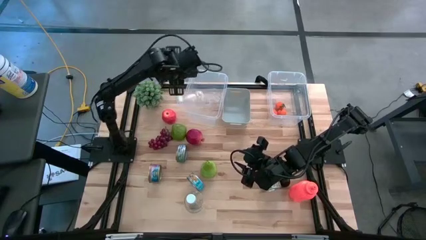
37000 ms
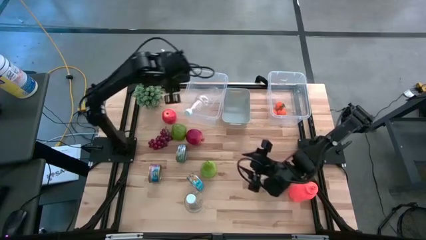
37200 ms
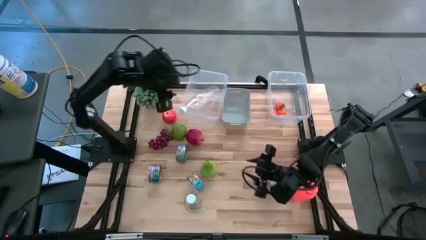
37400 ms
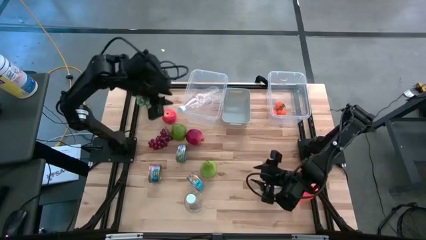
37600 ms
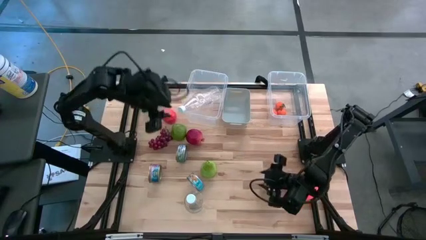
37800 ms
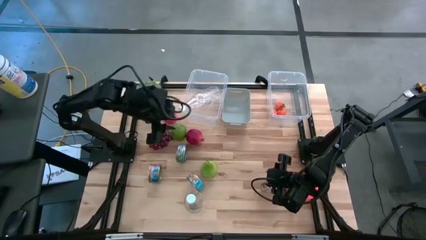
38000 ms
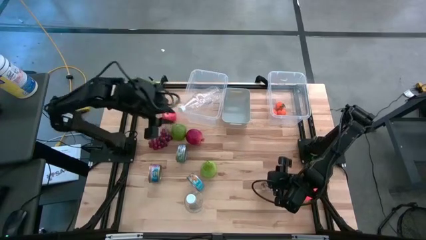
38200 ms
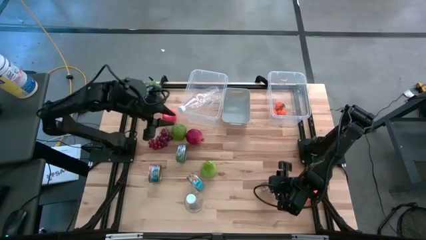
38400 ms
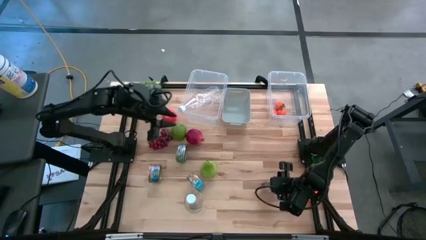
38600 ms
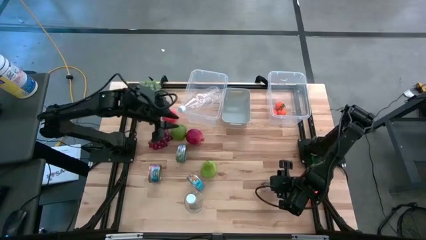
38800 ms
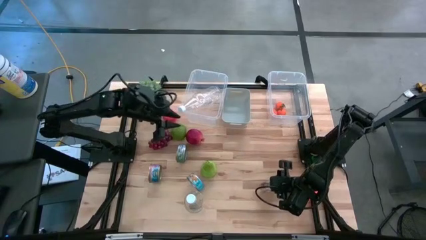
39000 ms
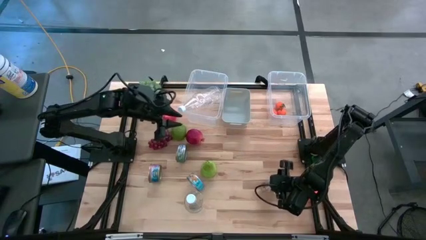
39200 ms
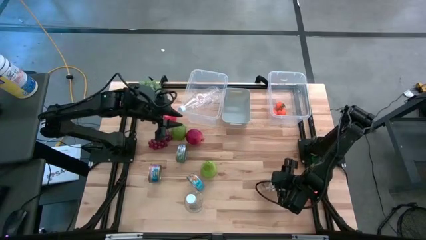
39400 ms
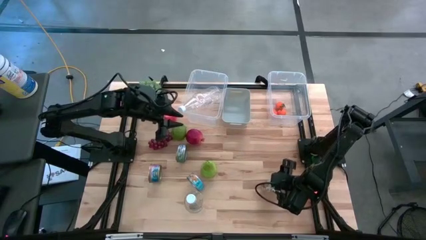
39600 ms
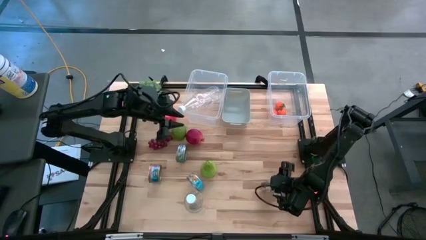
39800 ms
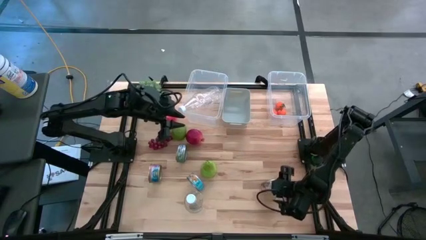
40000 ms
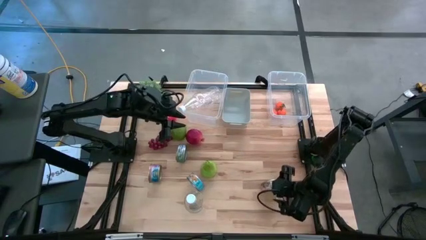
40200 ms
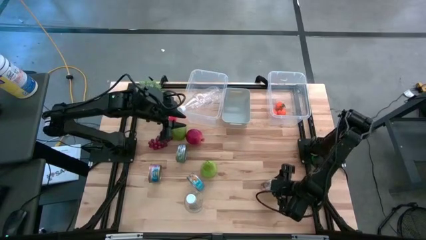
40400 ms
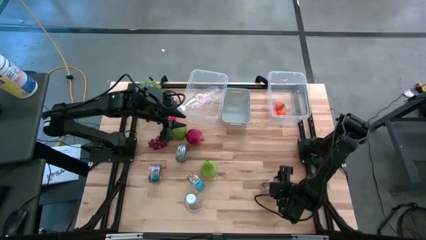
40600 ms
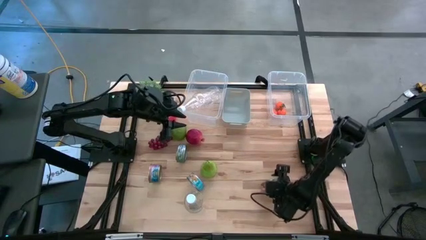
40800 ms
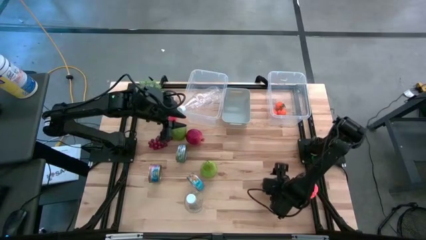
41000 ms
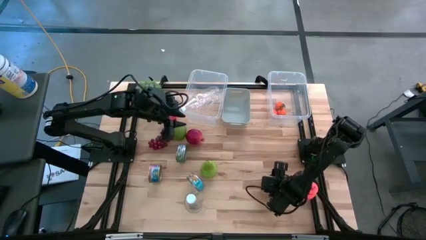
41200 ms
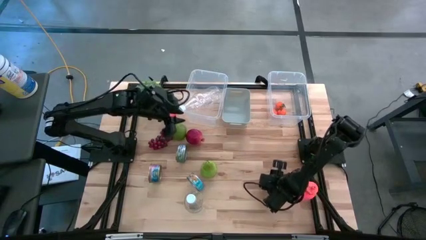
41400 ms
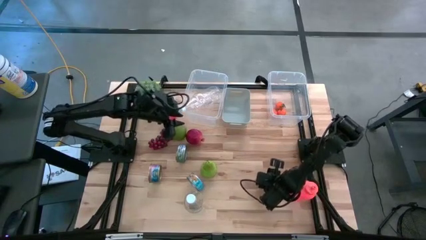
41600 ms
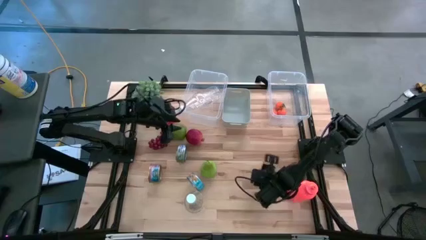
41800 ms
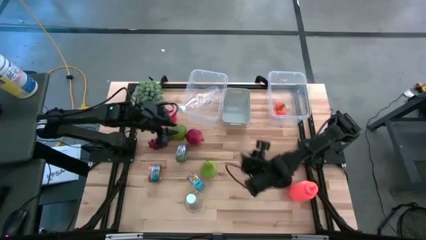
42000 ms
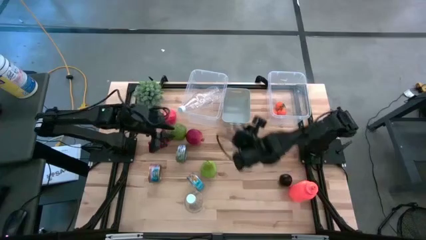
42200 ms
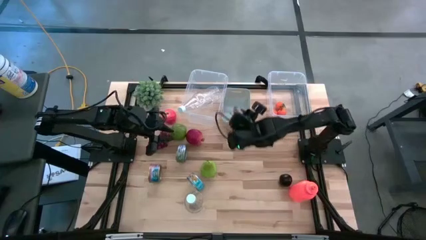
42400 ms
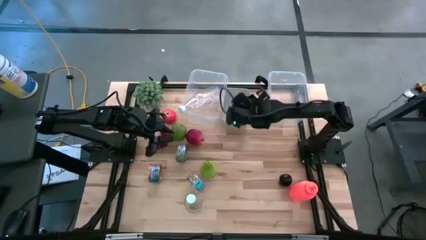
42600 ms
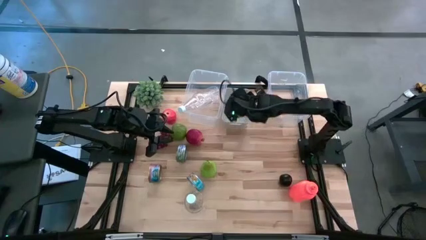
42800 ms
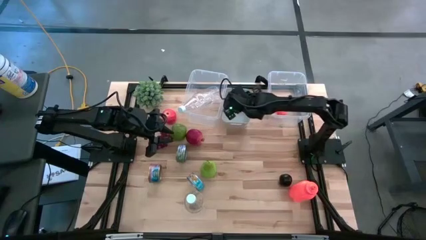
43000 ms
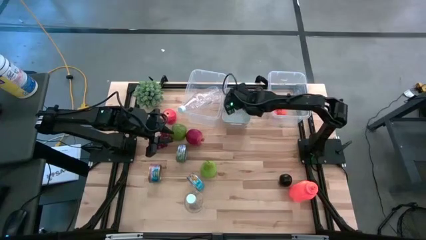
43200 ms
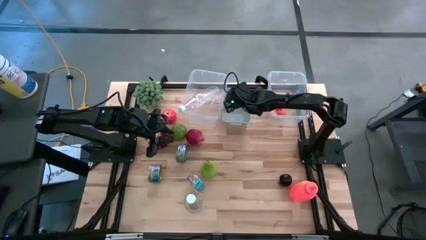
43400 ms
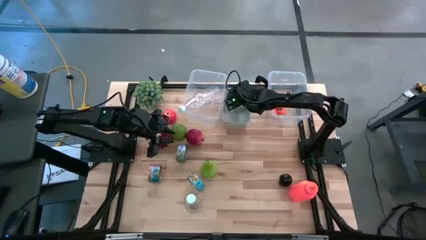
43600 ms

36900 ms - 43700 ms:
Task: Pick & Place Food Item
Put the green tuna can into the gray bin

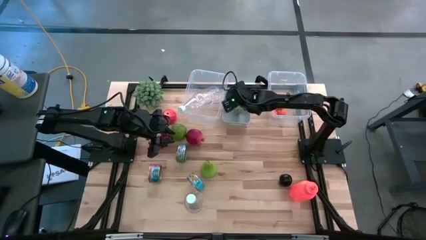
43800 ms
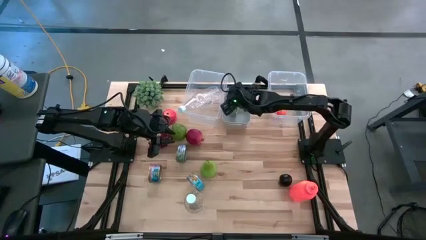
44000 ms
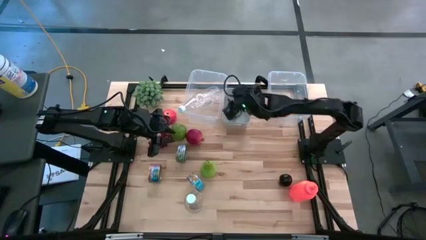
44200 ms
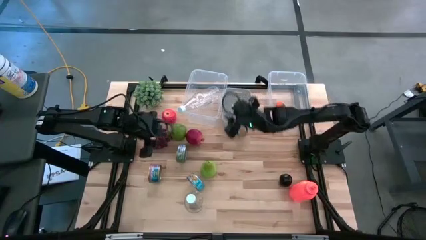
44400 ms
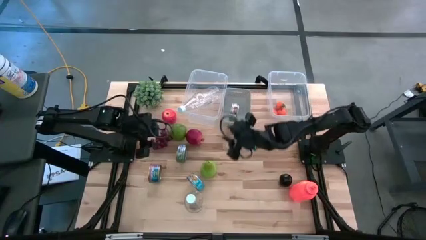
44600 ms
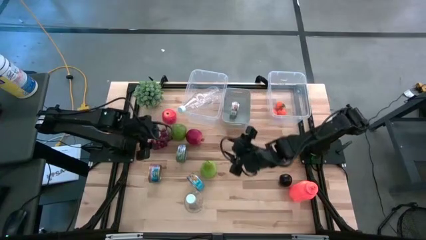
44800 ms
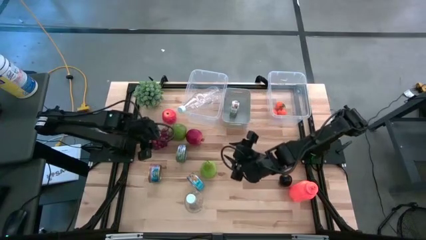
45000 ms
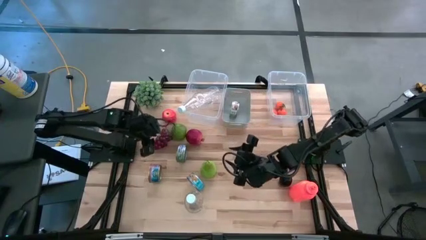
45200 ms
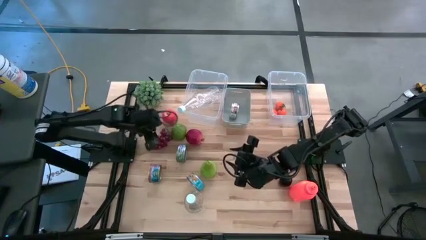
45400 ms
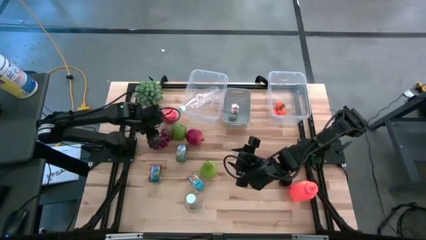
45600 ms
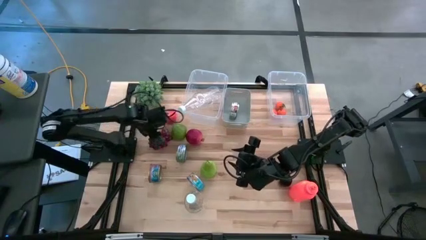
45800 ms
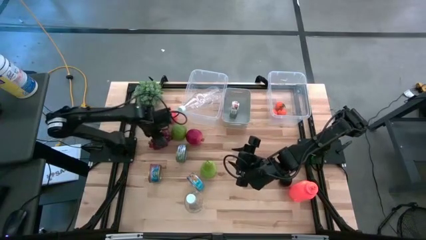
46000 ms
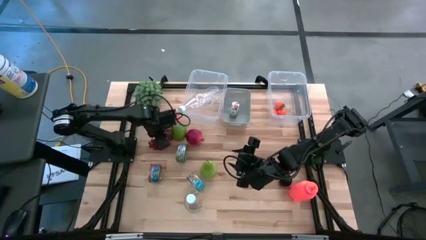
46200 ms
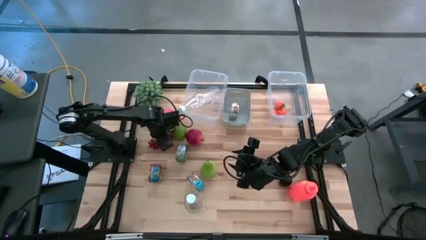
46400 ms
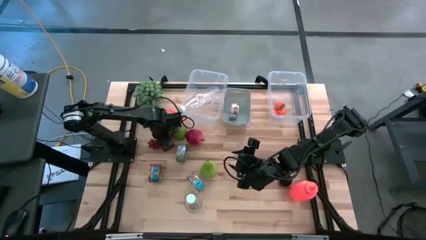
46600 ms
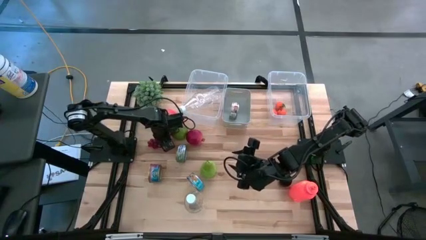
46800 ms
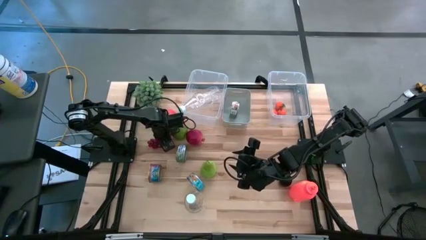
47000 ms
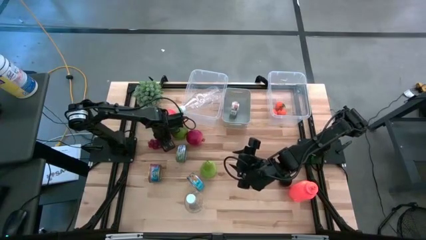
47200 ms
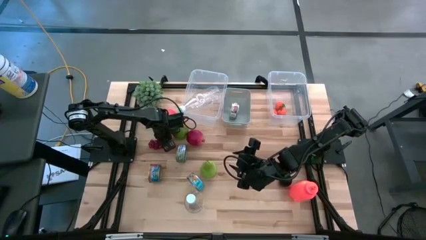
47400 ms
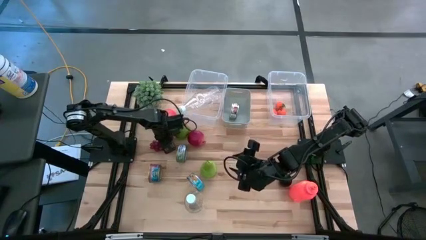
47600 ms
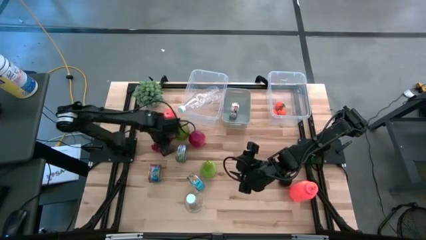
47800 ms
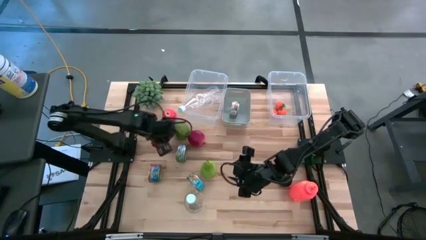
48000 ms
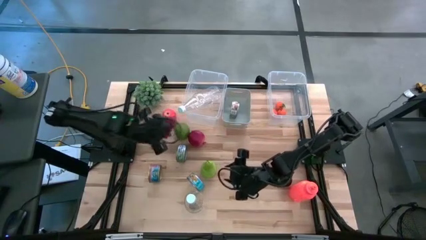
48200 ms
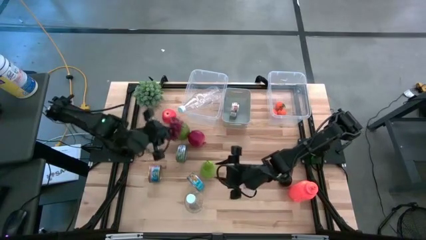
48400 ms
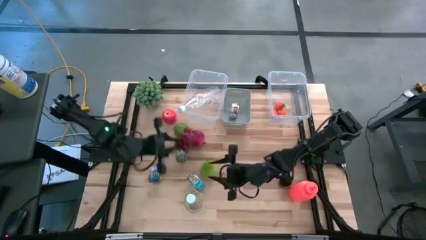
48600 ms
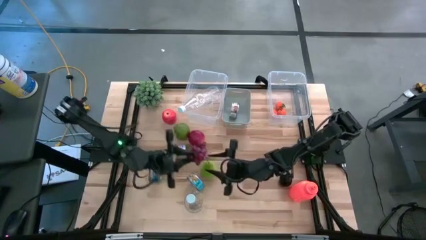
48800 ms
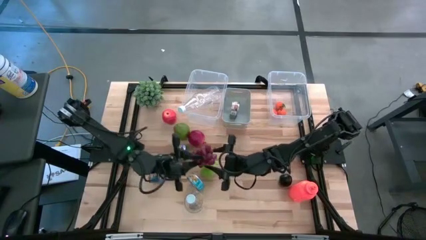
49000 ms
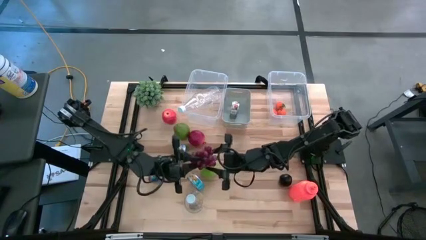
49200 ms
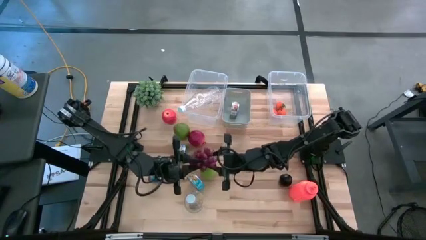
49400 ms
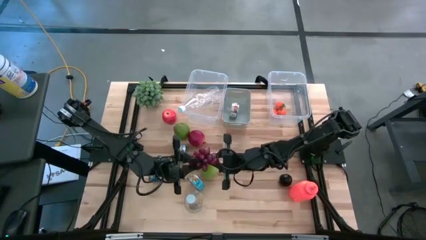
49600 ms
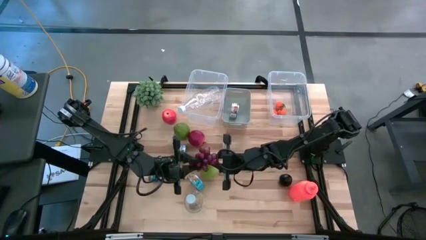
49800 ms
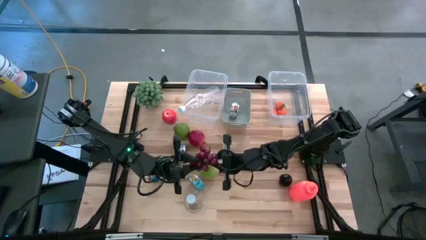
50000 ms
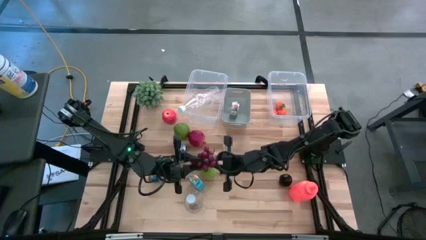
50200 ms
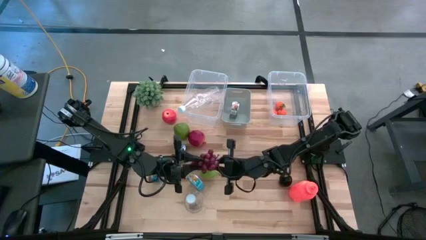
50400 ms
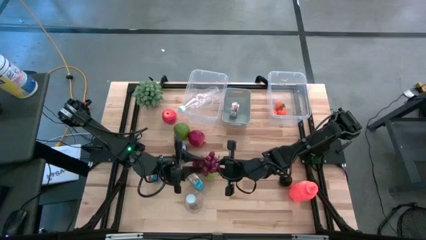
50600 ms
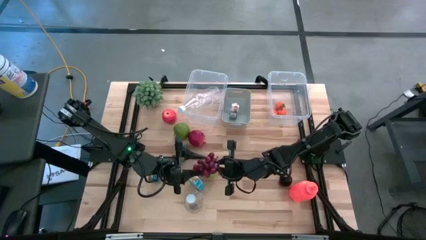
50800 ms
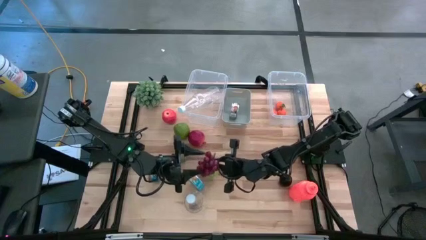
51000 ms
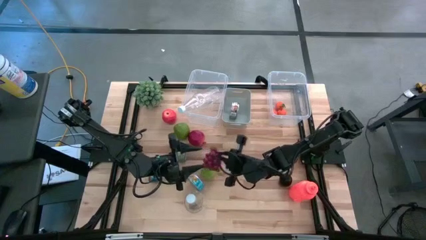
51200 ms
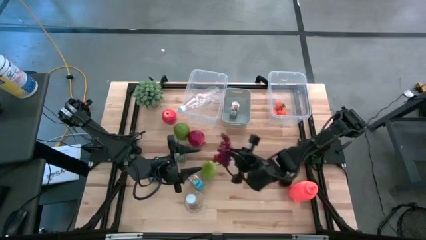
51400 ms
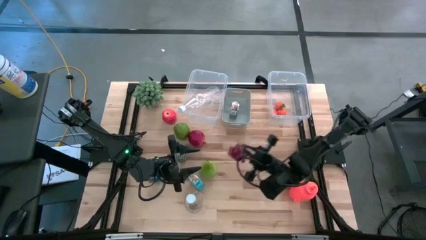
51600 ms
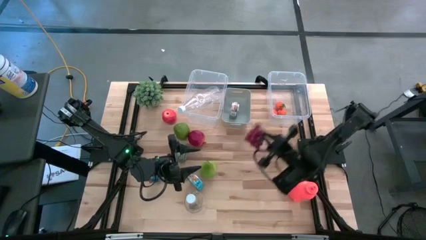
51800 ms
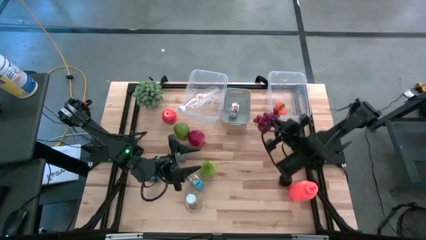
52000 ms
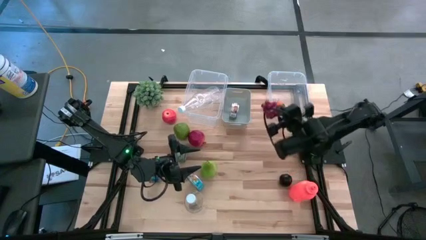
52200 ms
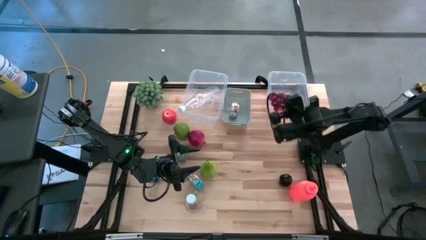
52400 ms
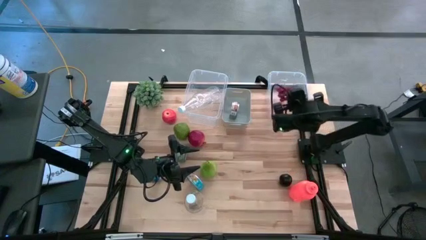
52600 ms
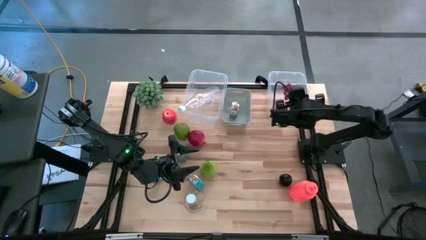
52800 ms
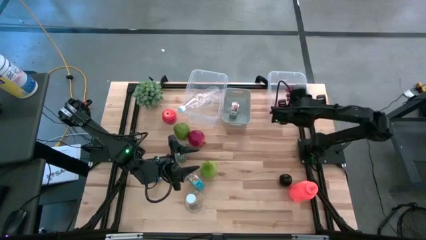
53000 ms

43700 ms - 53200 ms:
Put the grape into the right transparent bin
